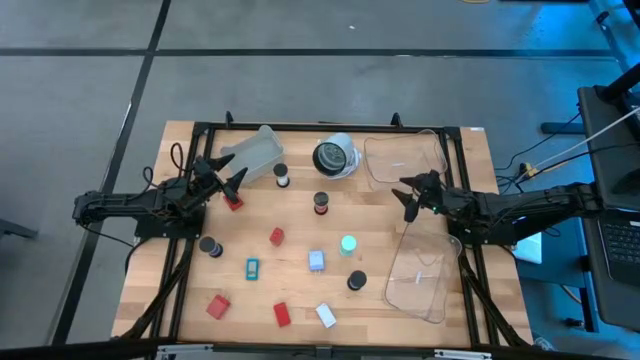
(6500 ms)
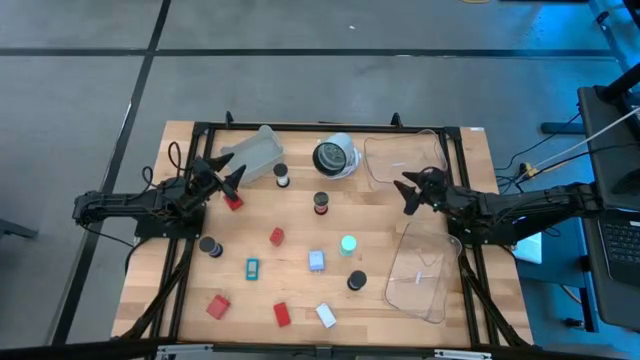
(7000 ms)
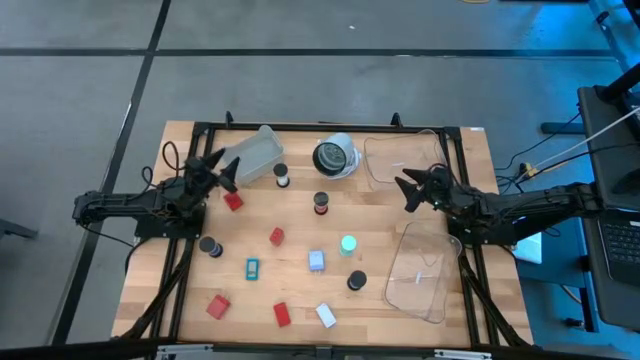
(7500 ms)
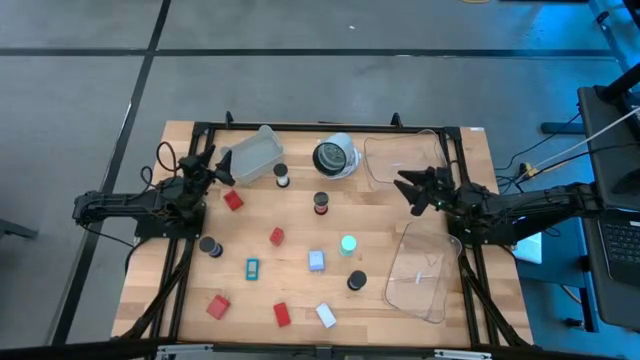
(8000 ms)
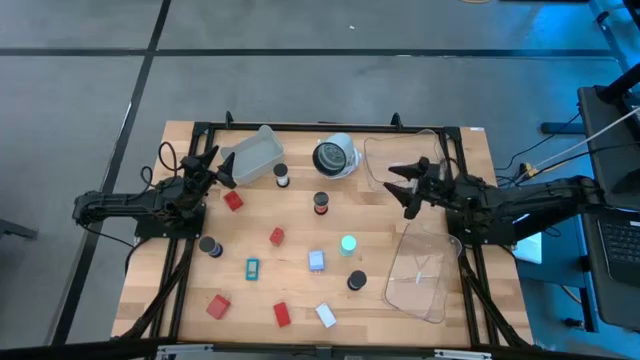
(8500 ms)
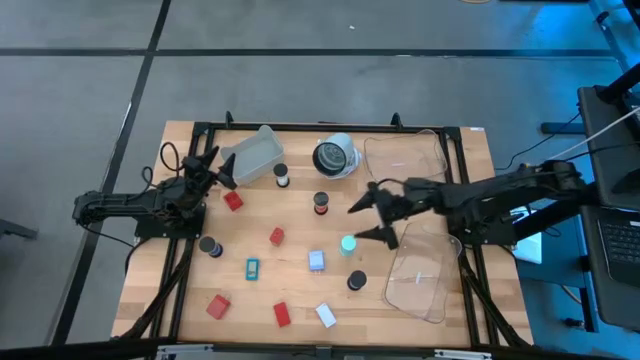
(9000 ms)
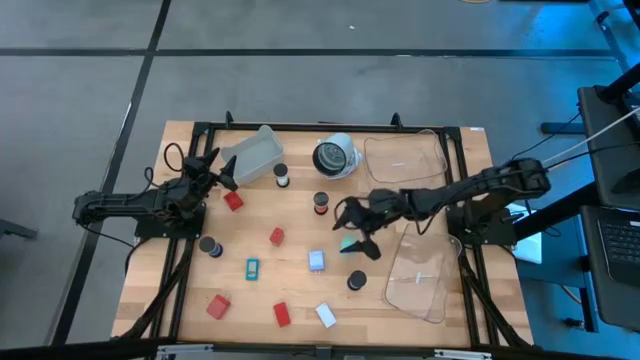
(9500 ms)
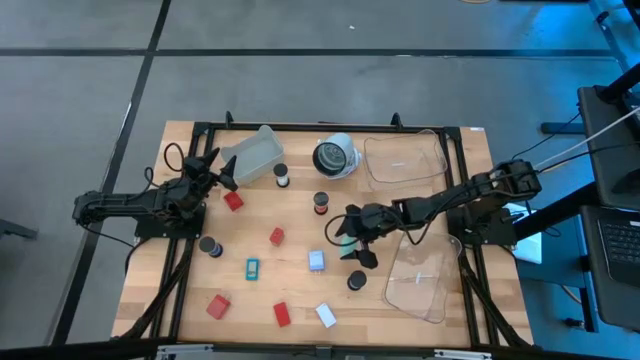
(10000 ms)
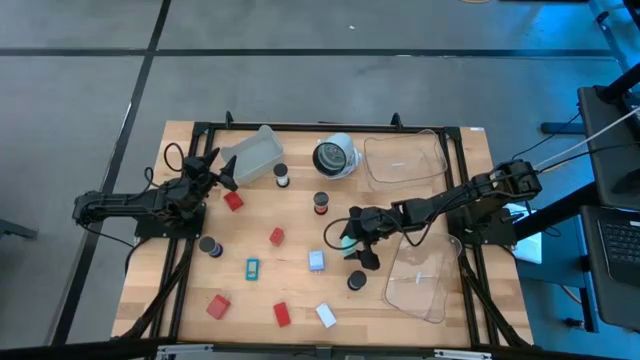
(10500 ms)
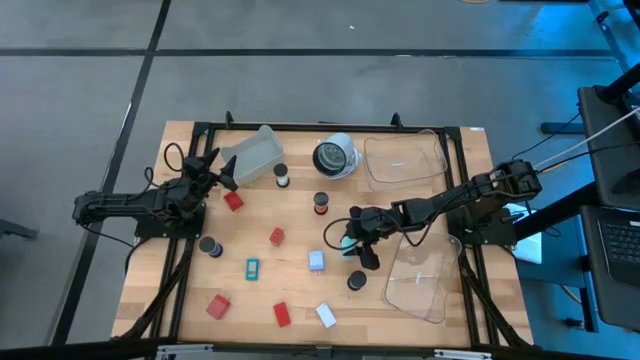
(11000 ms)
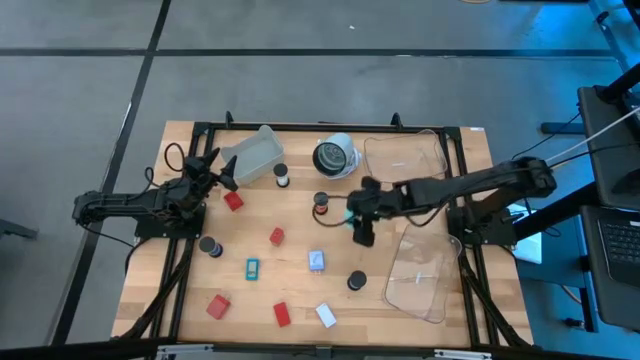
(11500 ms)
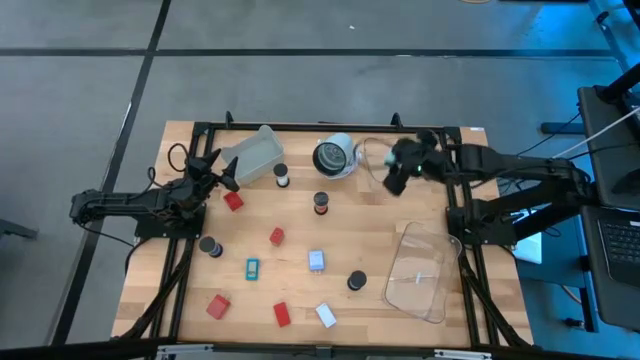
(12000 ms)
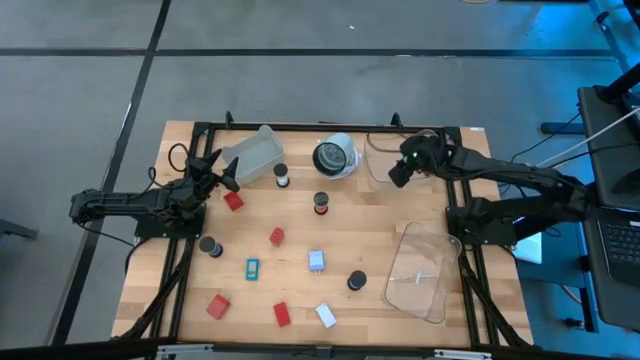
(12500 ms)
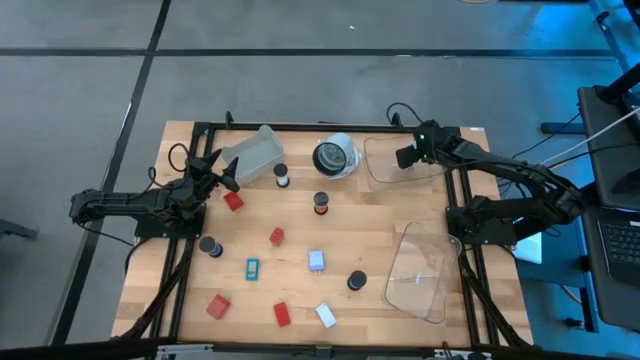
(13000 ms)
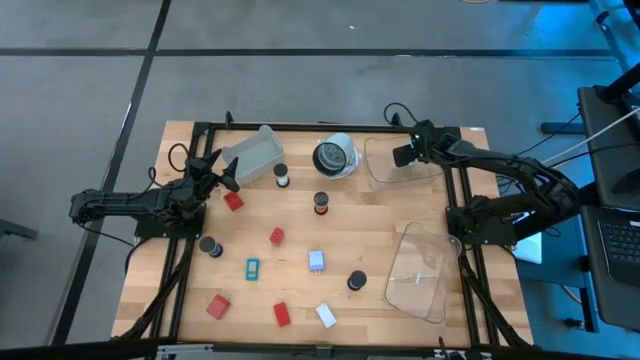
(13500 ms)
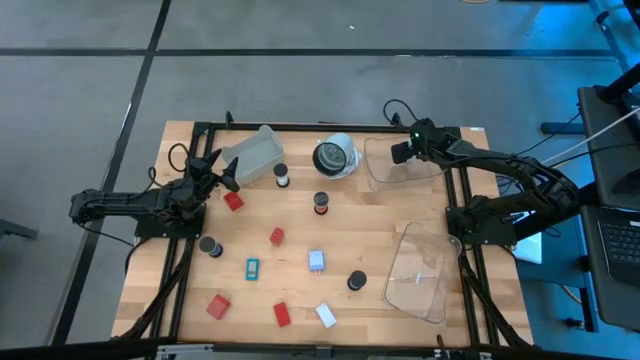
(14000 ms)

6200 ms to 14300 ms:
Task: Pick & Place Office items
Put the light blue hourglass into the top transparent bin

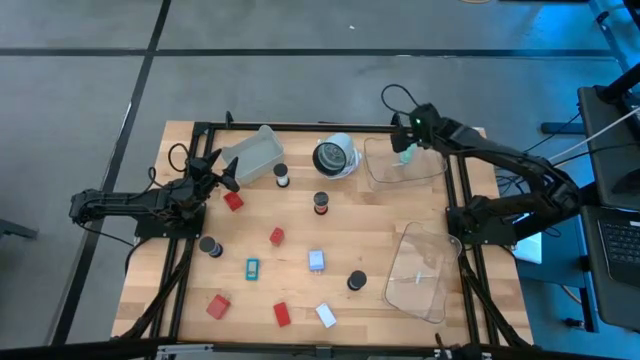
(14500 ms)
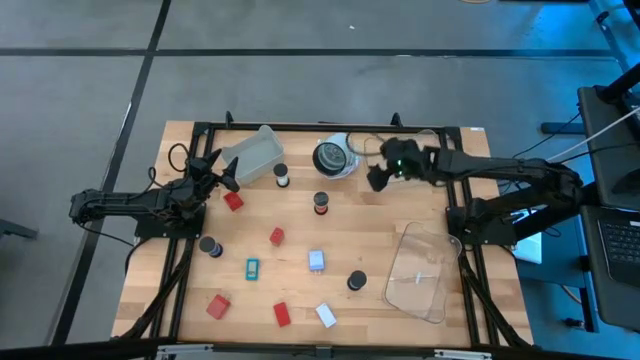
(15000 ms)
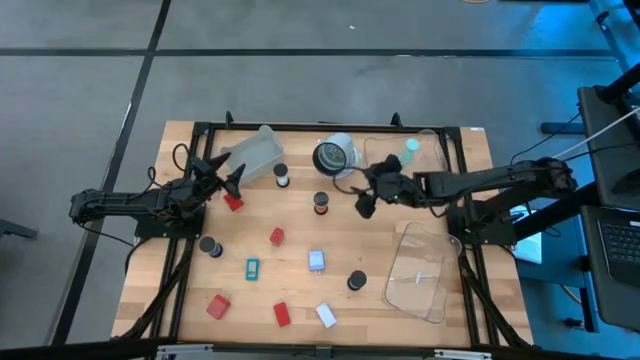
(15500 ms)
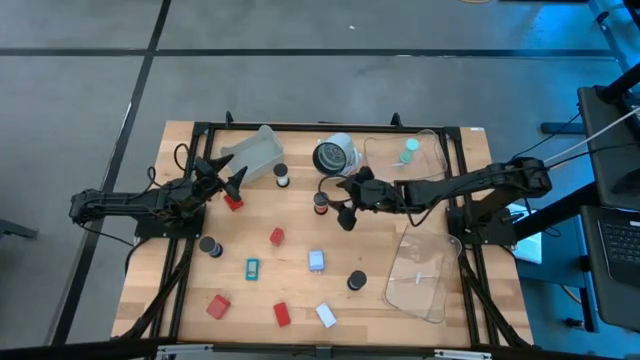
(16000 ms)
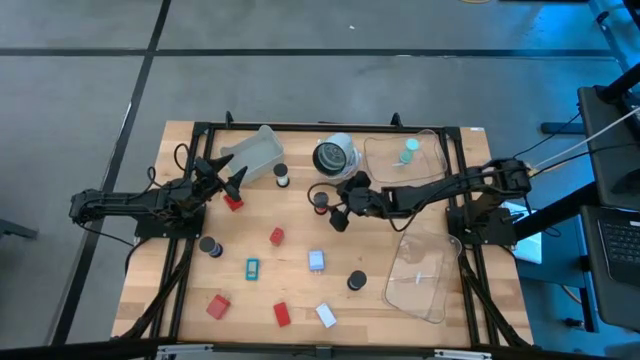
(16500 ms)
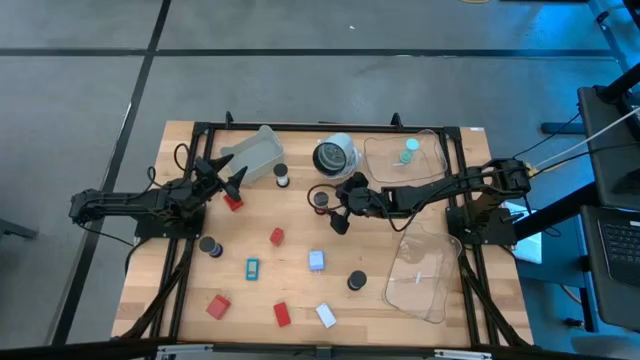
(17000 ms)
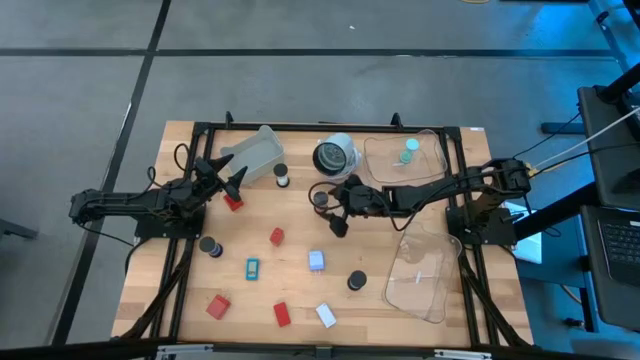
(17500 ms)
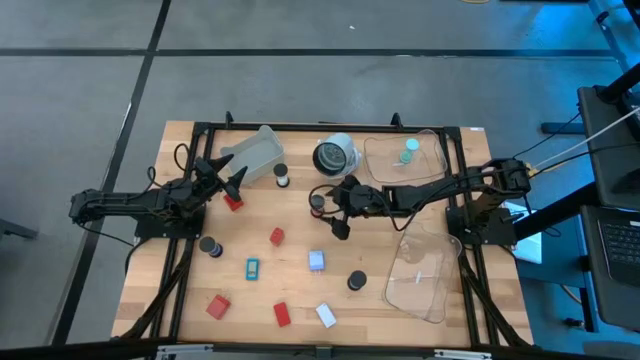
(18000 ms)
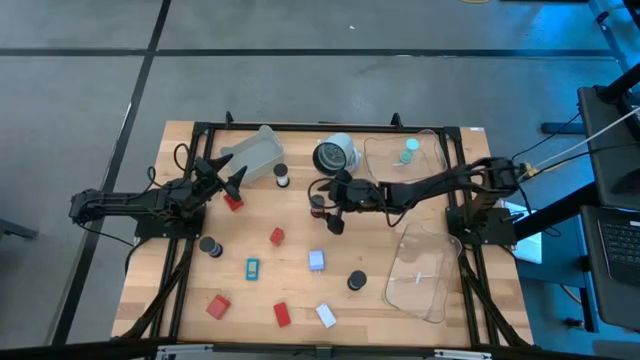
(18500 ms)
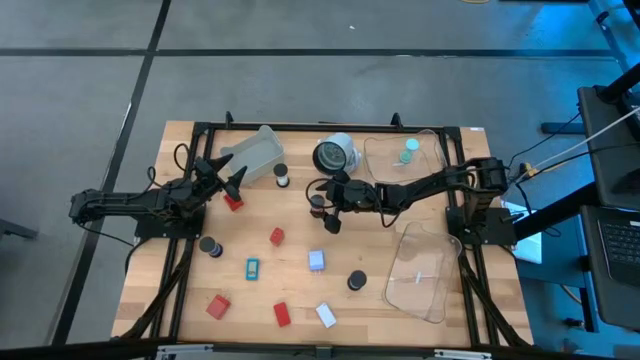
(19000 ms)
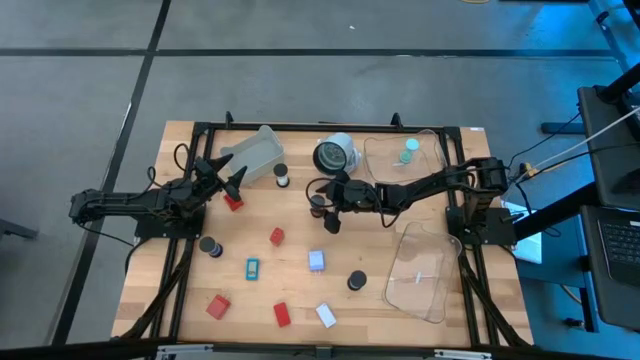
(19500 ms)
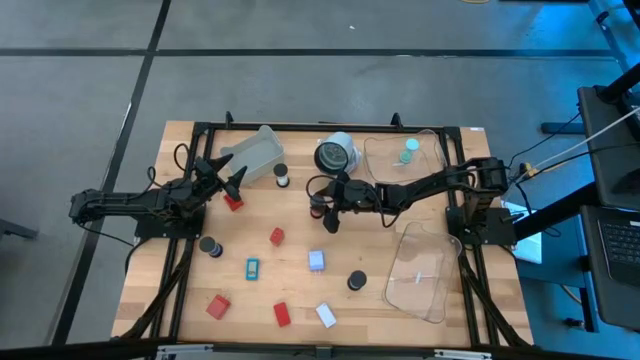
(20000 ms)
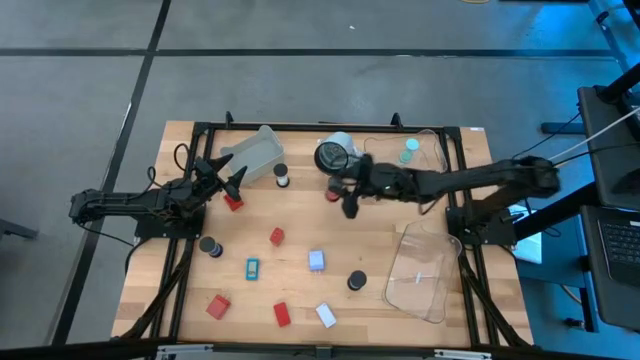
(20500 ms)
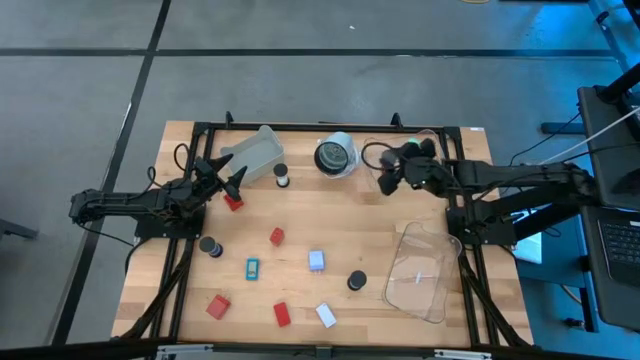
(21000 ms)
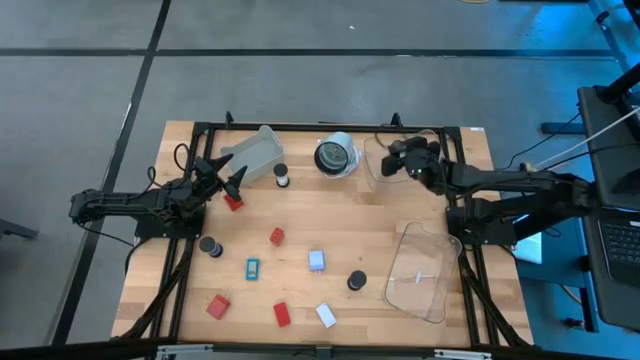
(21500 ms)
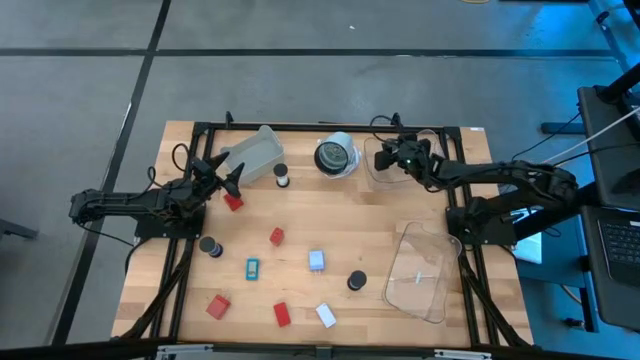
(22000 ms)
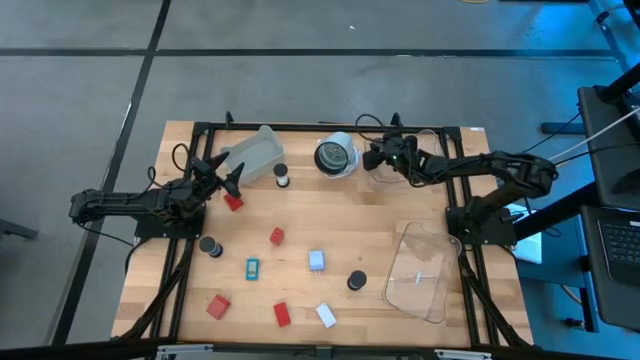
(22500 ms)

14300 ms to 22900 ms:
Put the red hourglass into the top transparent bin

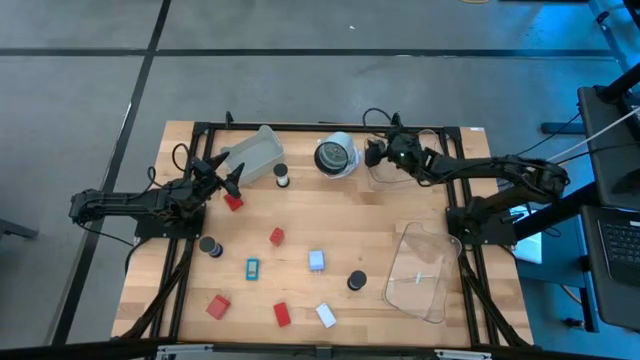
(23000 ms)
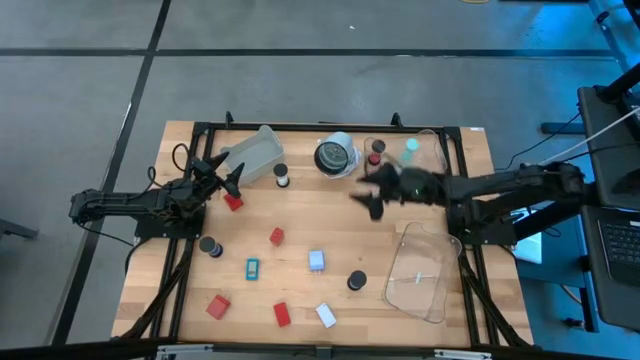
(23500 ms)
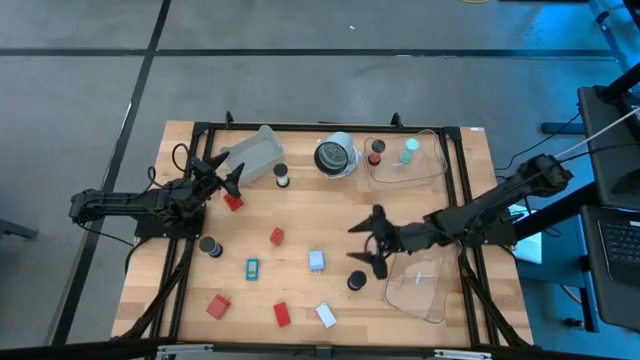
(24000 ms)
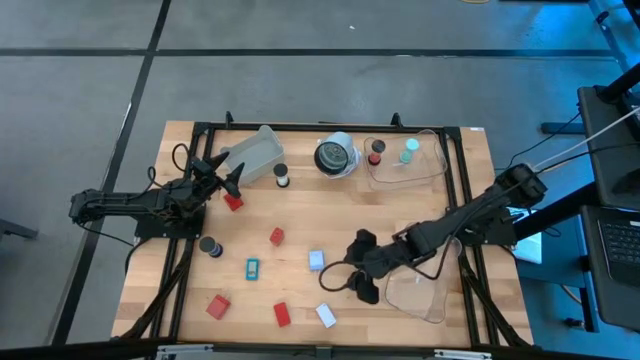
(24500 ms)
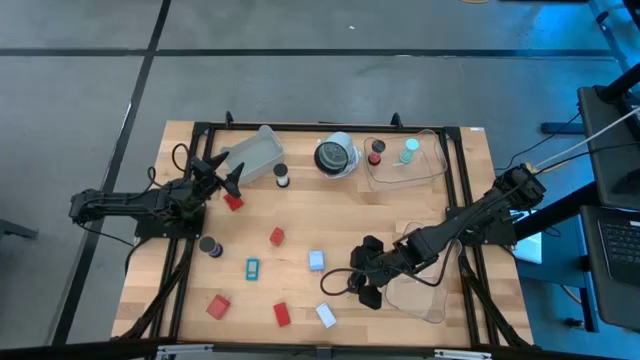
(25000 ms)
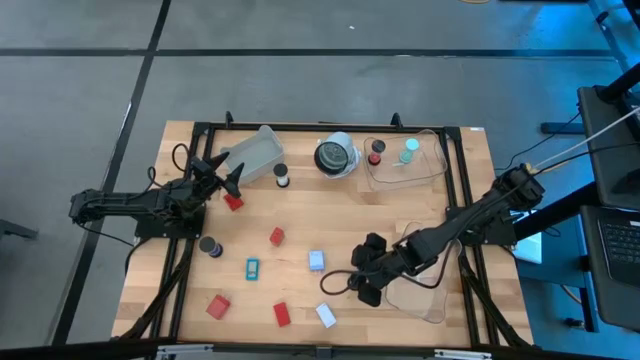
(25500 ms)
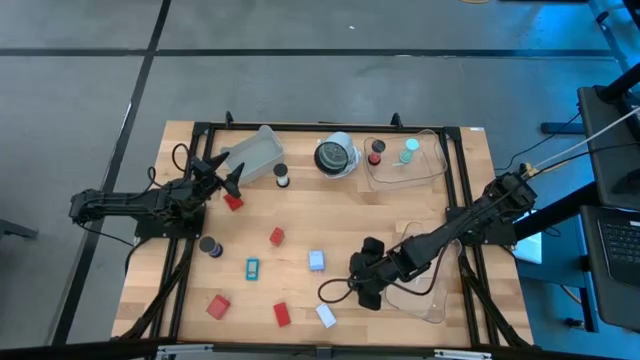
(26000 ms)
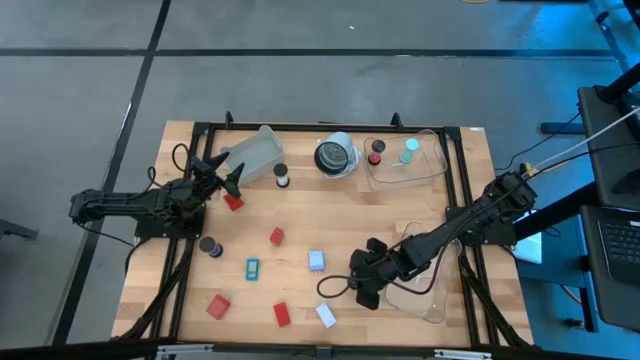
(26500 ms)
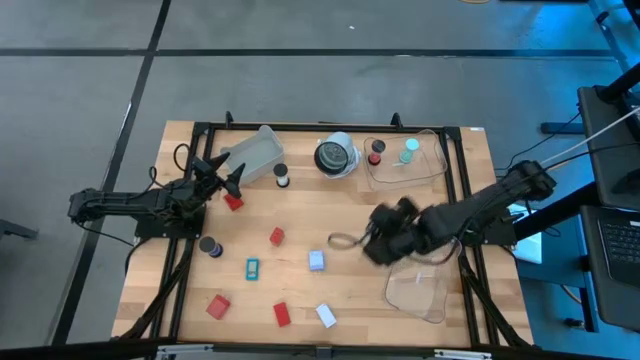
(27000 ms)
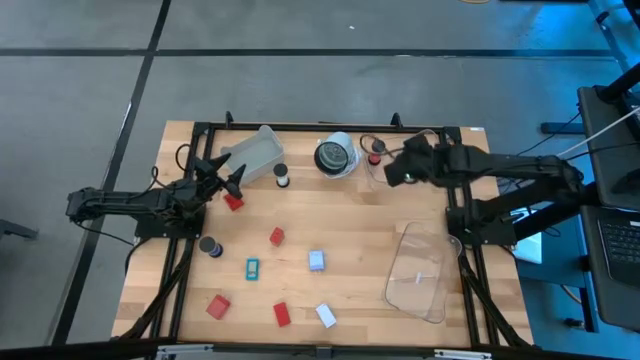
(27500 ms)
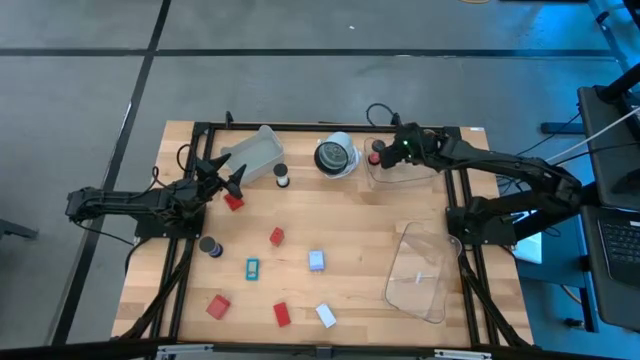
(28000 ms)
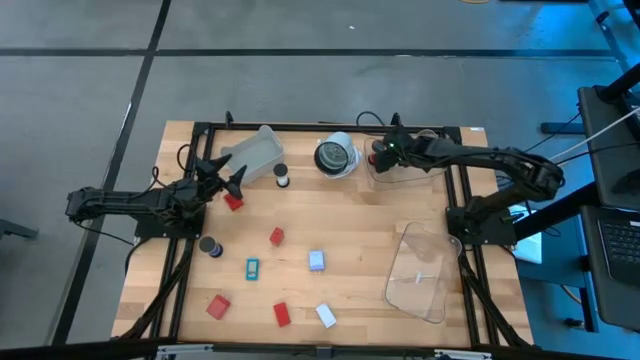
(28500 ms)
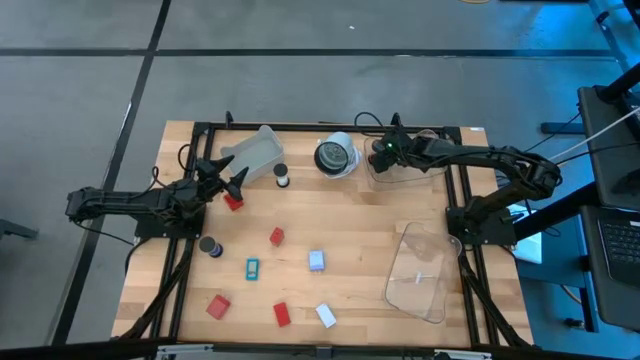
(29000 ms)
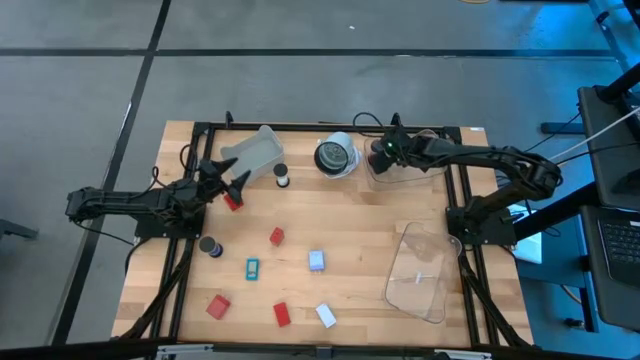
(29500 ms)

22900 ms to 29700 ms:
Put the right blue hourglass into the top transparent bin
